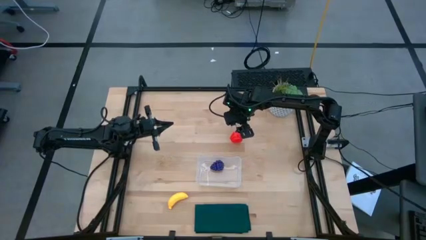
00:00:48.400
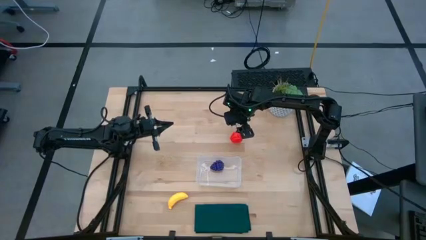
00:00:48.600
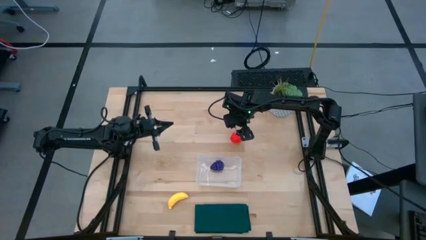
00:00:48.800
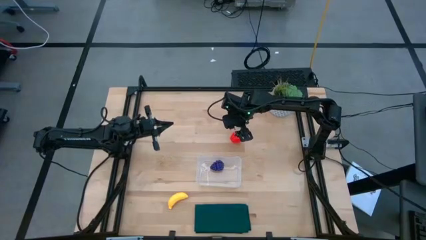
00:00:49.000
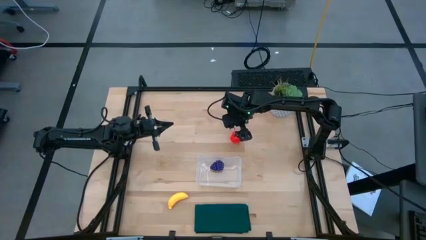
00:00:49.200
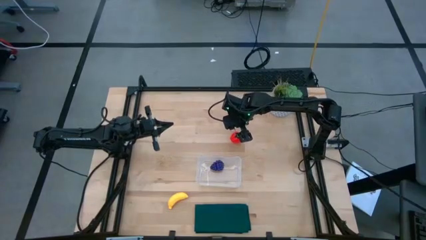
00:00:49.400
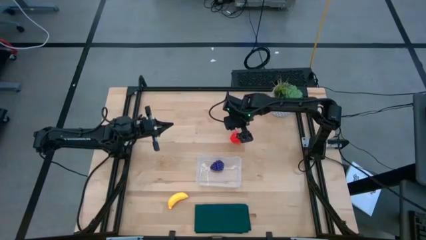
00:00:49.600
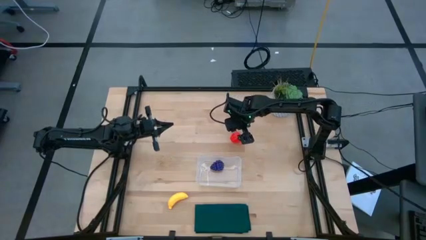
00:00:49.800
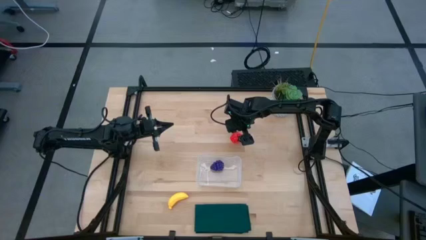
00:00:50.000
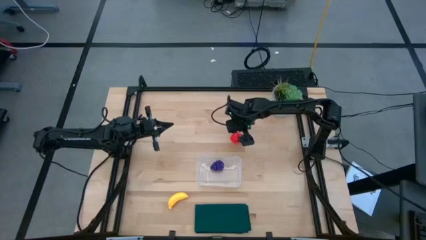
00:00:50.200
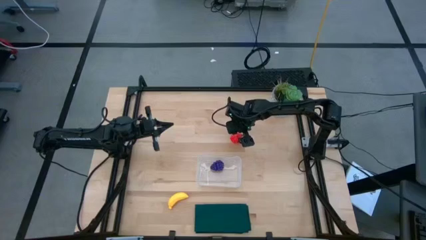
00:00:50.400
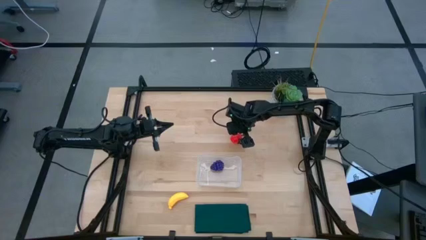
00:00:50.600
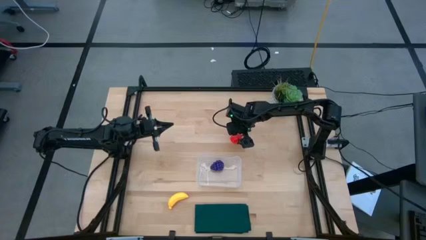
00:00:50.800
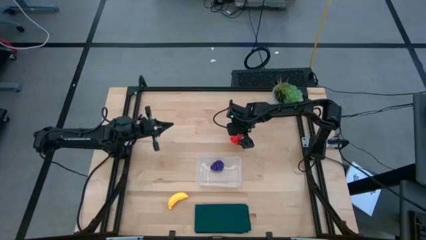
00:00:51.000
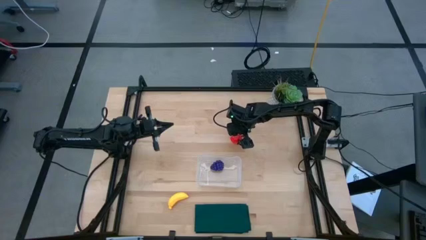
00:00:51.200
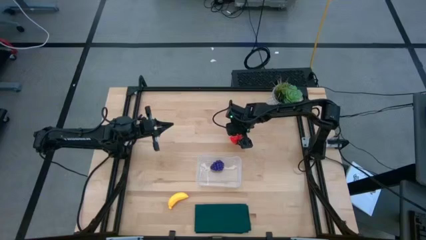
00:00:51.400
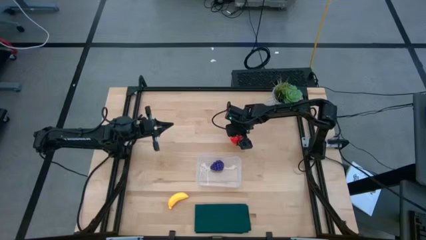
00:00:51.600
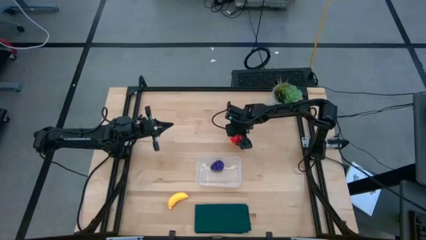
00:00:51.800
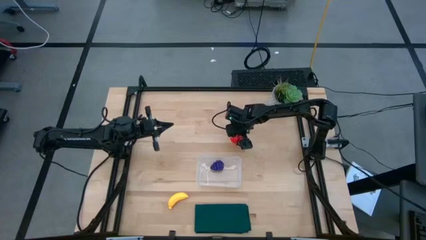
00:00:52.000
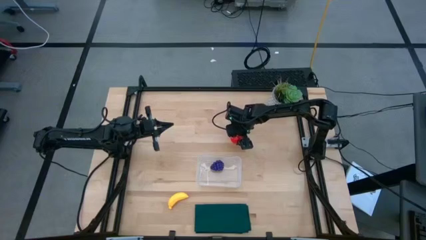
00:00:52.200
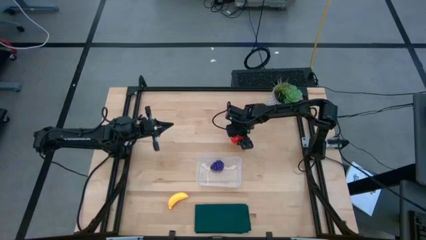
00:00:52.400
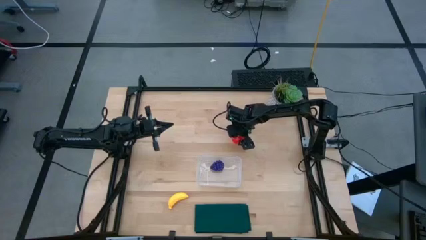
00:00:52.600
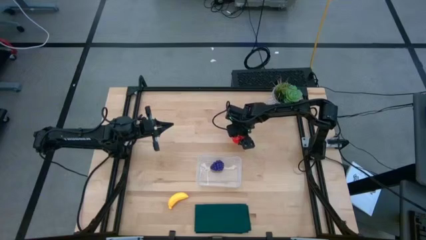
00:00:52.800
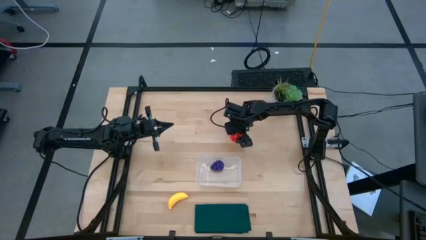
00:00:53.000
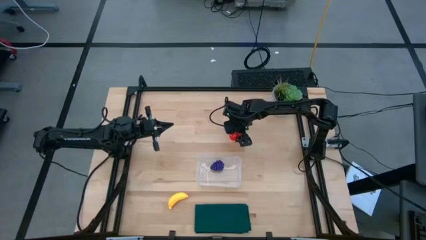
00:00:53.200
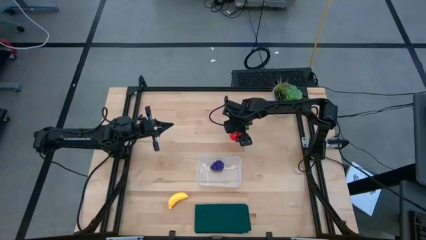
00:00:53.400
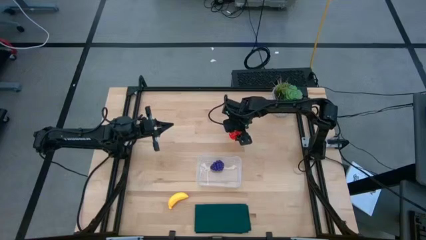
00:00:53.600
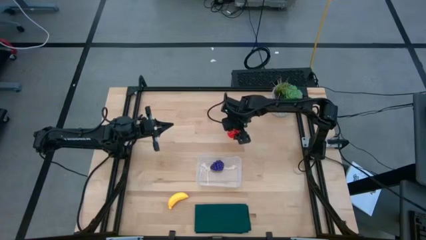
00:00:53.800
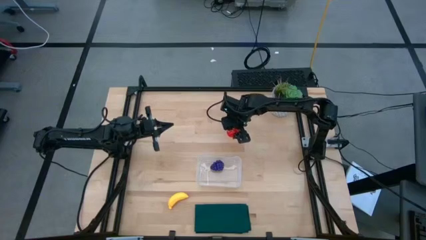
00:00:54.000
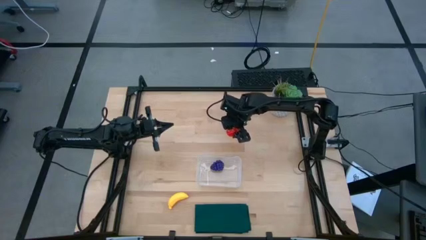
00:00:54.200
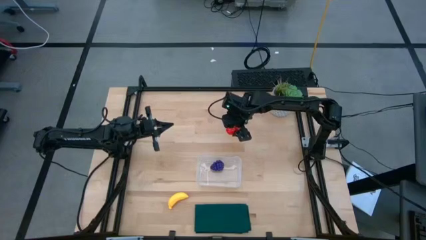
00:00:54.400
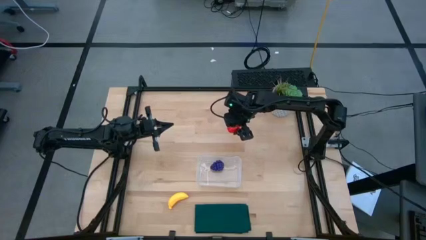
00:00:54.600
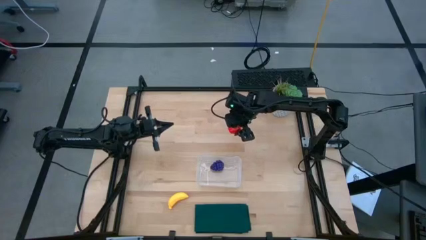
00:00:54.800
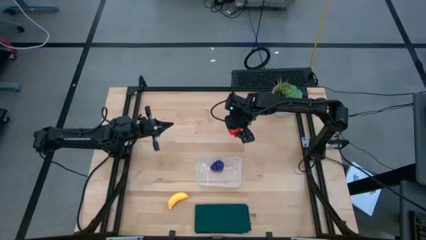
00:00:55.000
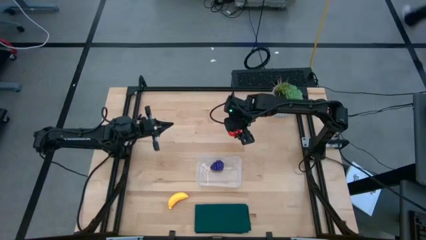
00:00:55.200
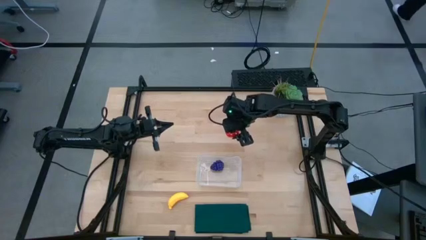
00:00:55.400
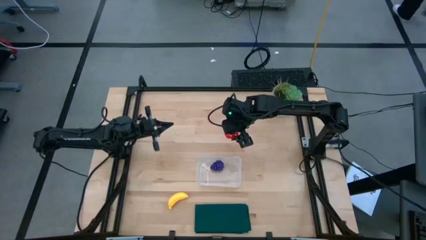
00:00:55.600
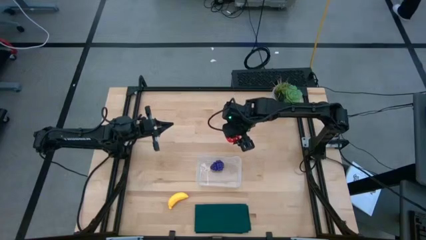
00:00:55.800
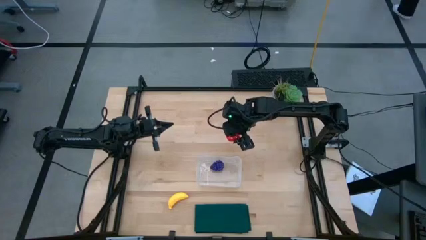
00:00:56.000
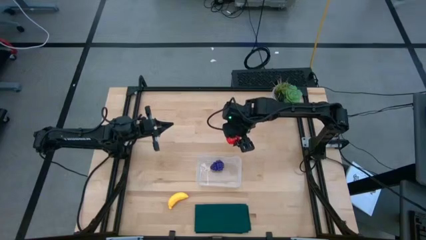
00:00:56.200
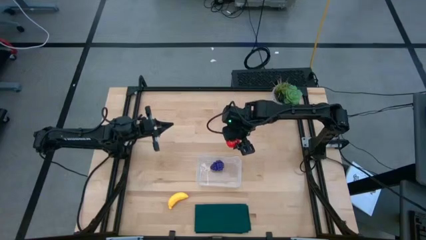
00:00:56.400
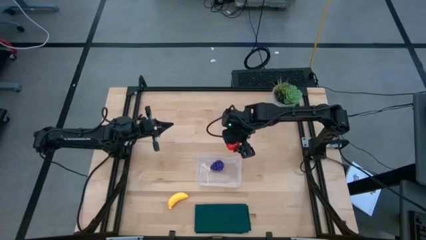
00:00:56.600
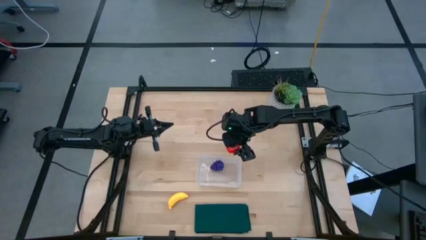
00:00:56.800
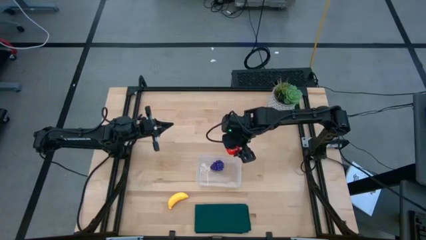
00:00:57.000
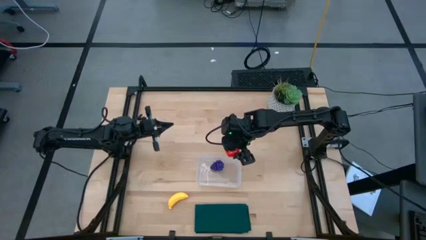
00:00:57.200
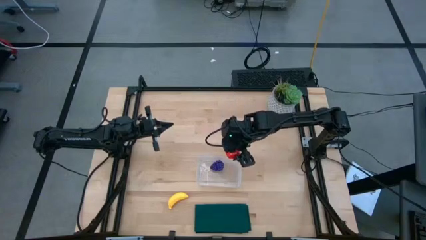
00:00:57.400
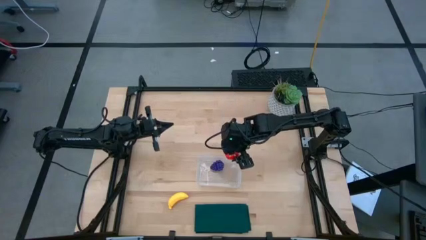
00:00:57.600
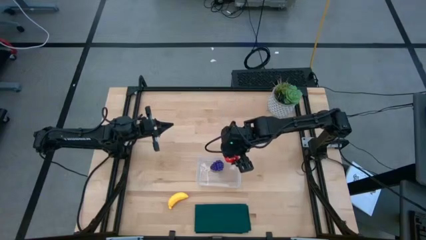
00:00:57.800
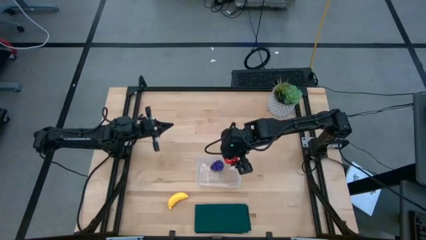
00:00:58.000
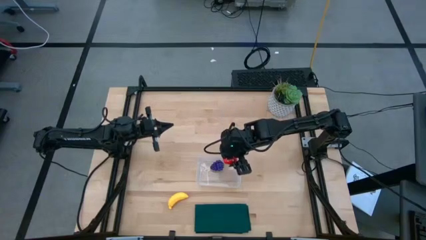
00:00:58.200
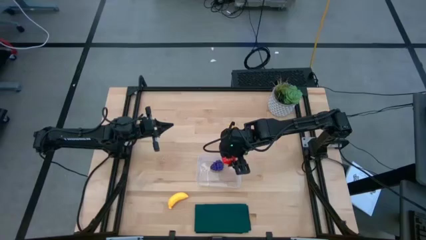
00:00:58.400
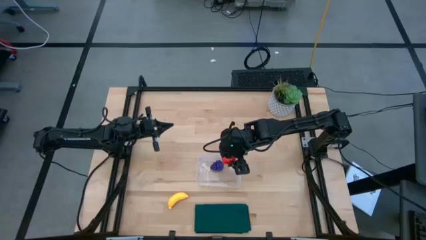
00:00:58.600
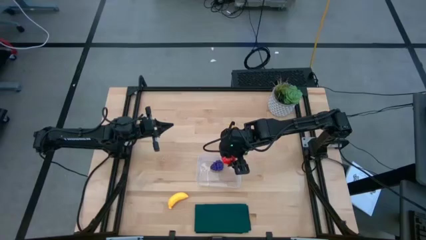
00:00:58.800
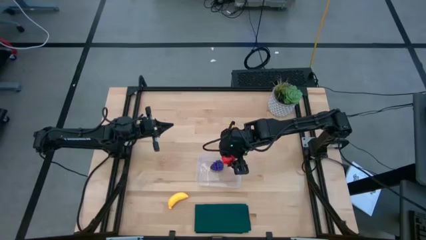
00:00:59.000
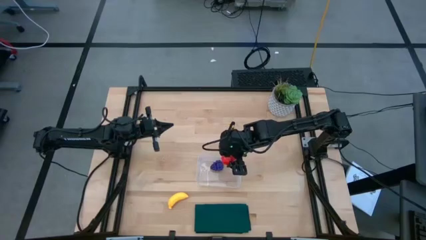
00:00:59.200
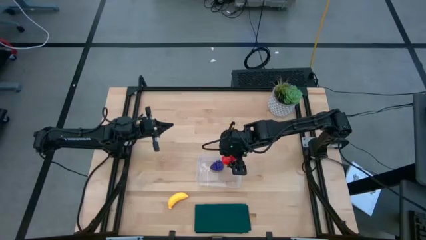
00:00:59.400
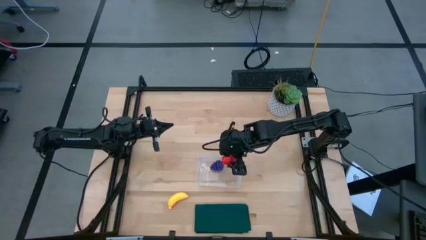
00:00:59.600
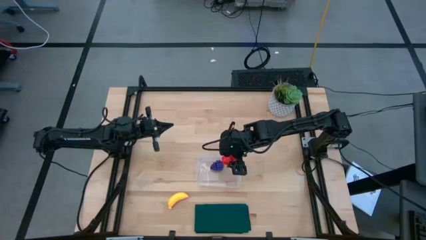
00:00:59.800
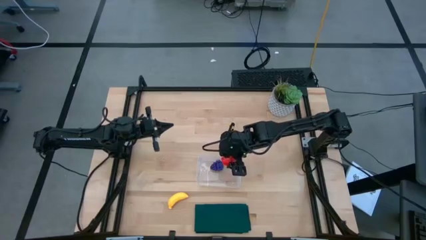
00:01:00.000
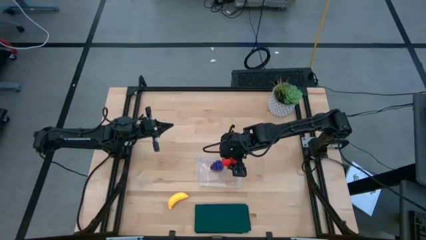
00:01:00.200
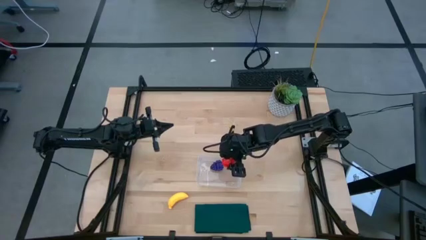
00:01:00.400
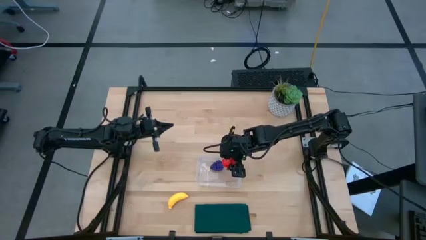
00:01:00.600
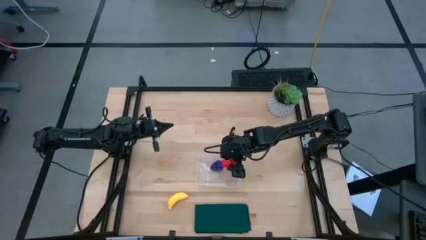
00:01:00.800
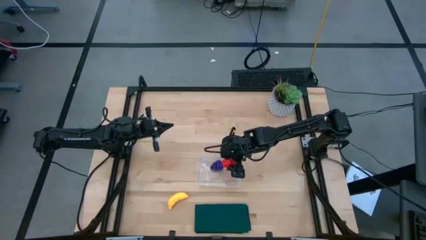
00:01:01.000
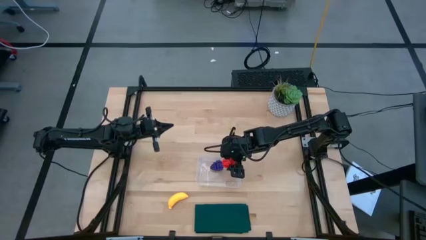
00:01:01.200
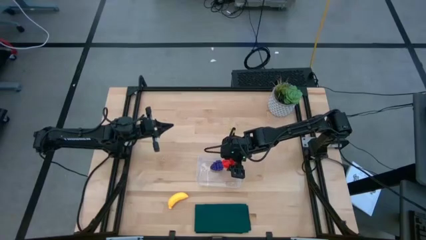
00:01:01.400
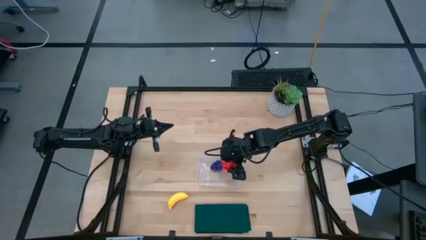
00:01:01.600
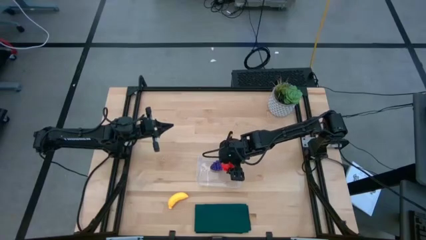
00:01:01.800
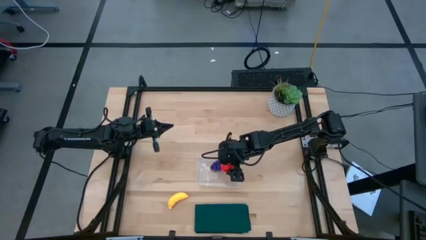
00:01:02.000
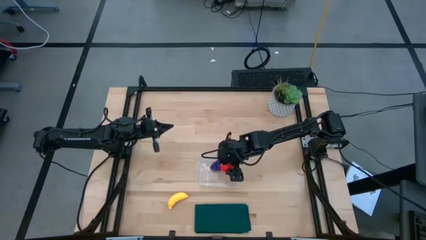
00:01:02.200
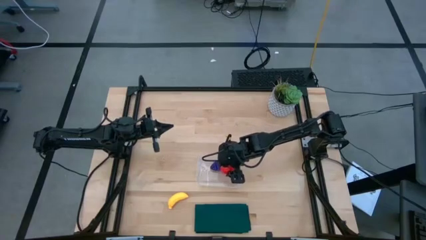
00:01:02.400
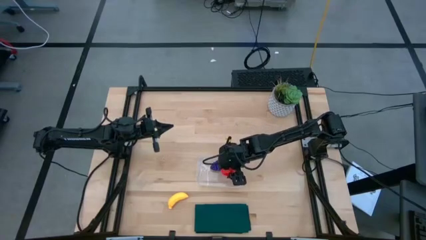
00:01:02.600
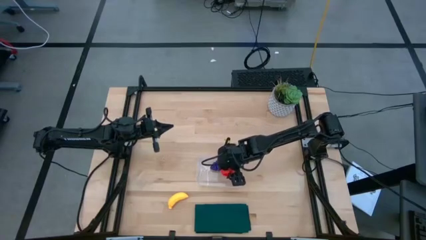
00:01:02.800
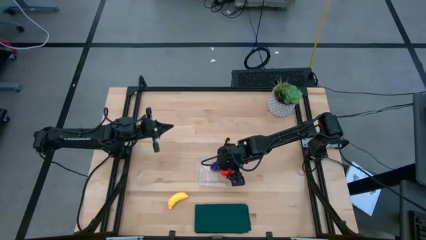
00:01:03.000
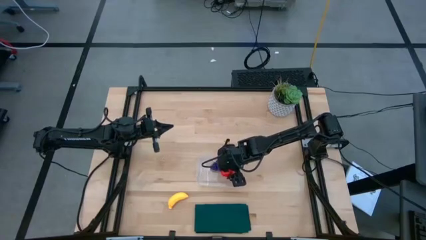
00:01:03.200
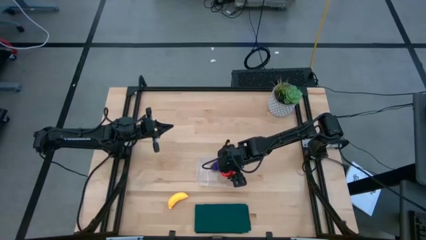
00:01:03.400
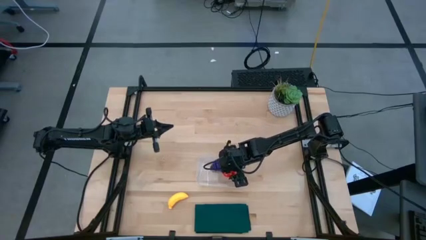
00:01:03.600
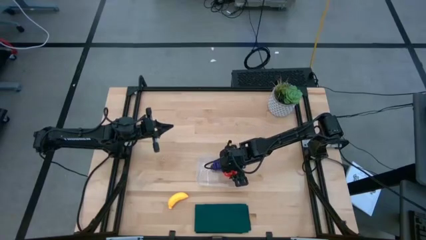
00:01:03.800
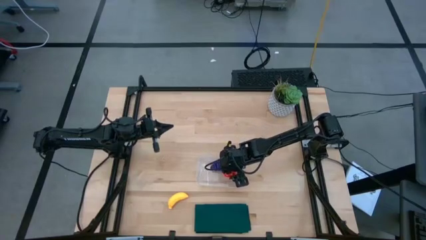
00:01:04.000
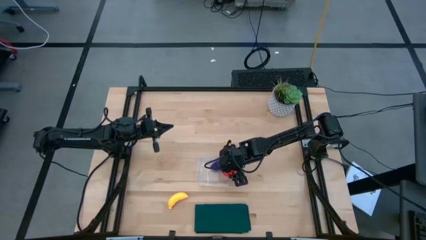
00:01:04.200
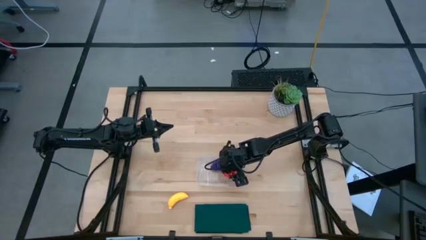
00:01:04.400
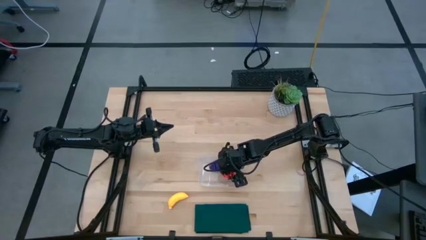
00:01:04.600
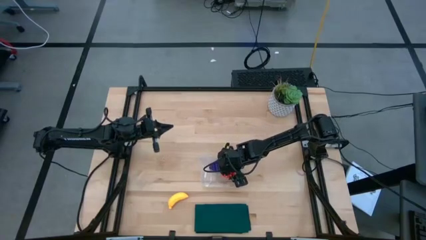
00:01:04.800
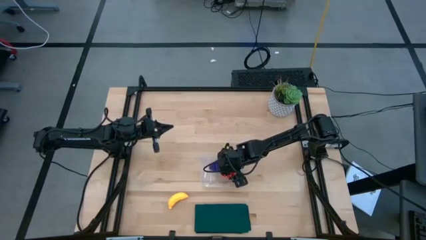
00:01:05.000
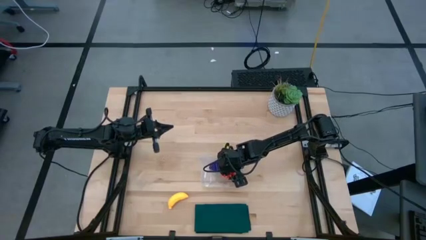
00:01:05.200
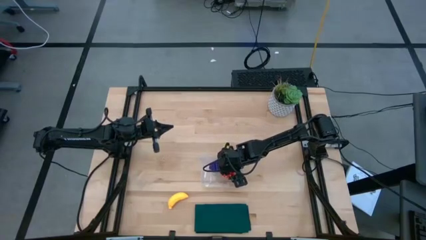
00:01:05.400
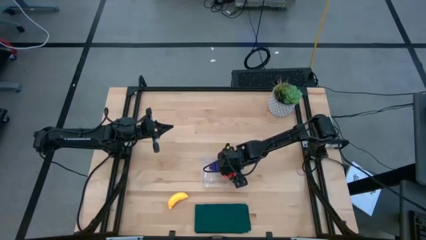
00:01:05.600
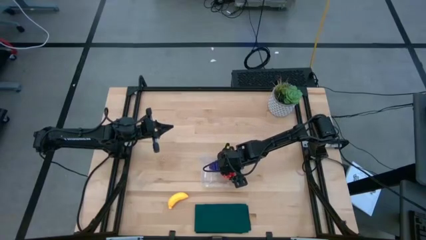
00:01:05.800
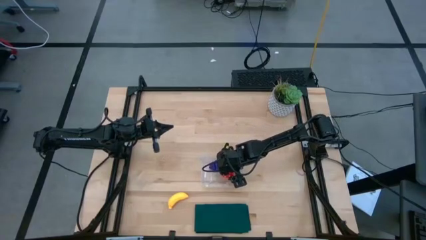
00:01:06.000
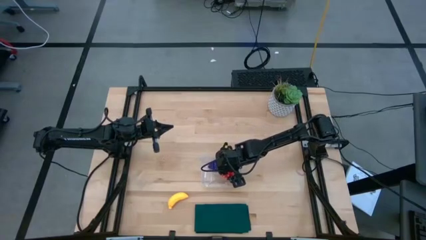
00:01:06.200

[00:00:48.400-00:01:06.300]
Task: Pick and placing Produce into tupperware
Put the apple into the transparent bin
